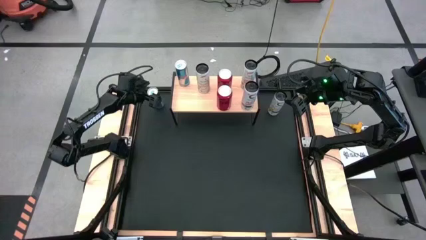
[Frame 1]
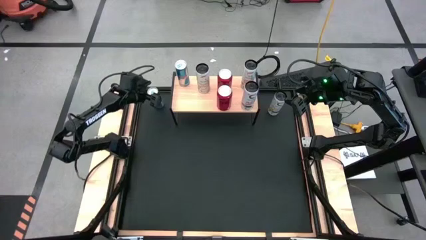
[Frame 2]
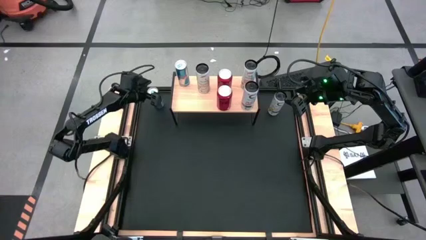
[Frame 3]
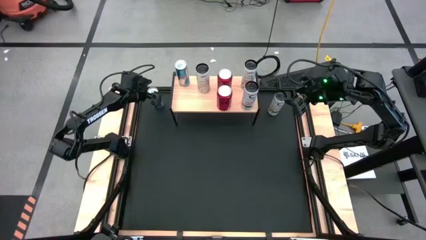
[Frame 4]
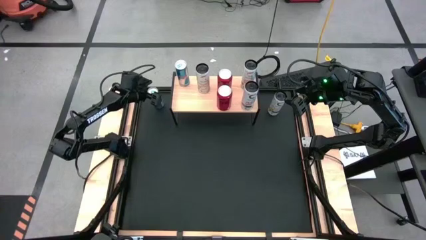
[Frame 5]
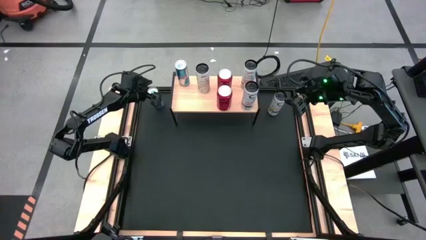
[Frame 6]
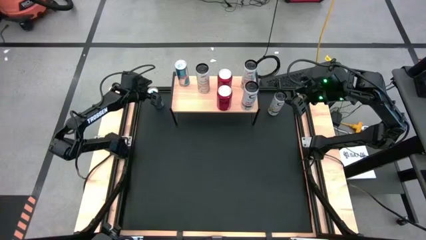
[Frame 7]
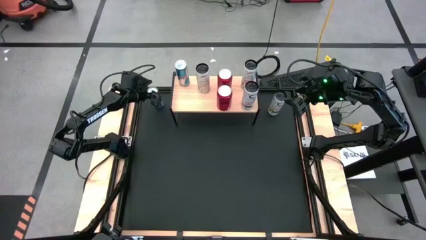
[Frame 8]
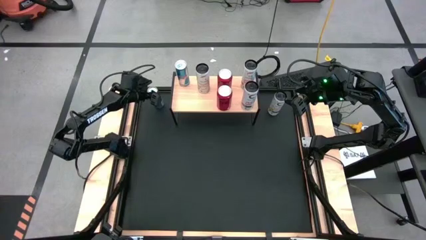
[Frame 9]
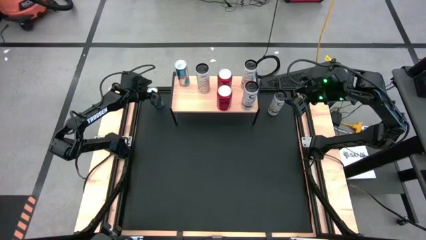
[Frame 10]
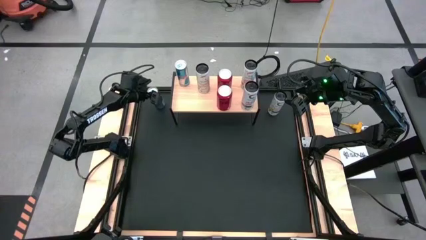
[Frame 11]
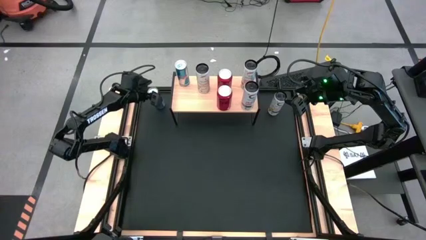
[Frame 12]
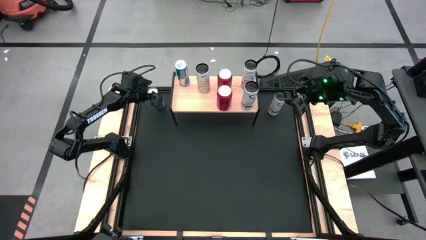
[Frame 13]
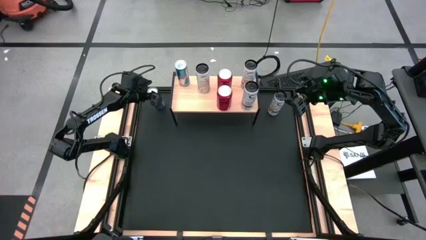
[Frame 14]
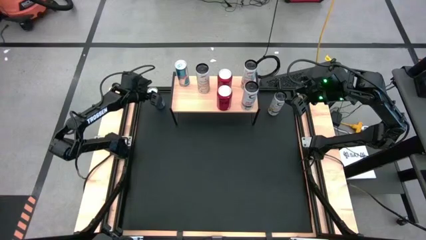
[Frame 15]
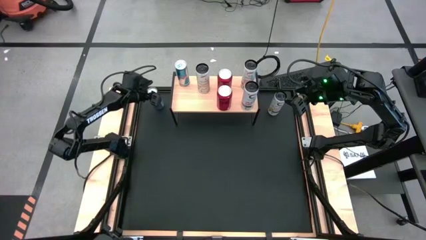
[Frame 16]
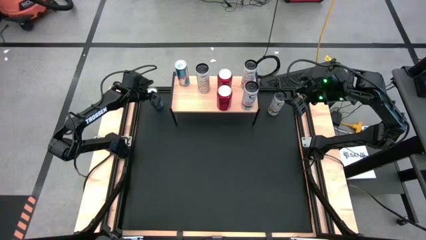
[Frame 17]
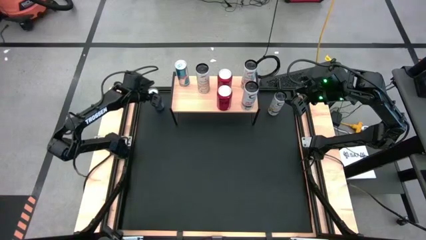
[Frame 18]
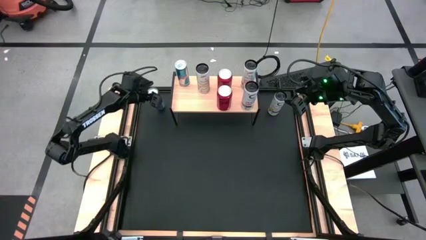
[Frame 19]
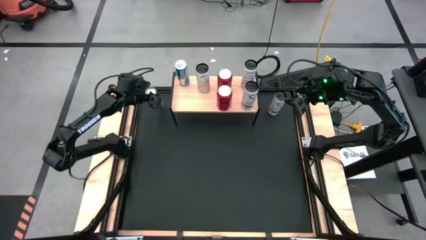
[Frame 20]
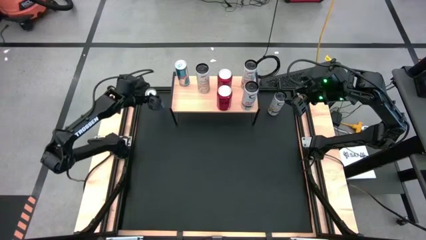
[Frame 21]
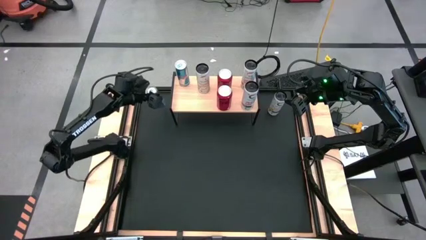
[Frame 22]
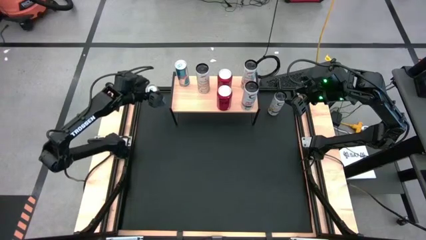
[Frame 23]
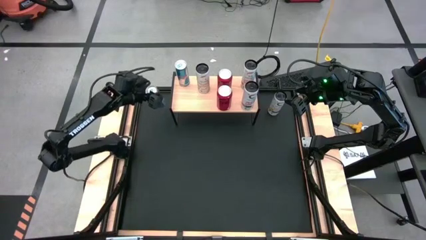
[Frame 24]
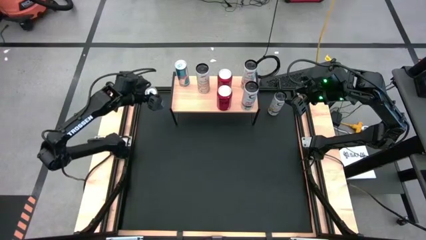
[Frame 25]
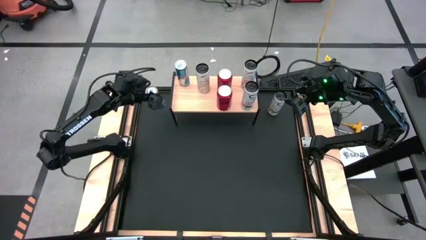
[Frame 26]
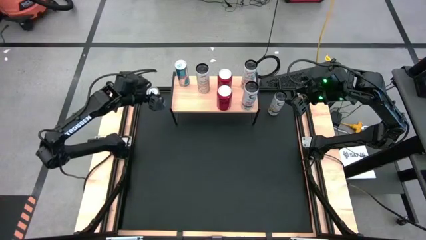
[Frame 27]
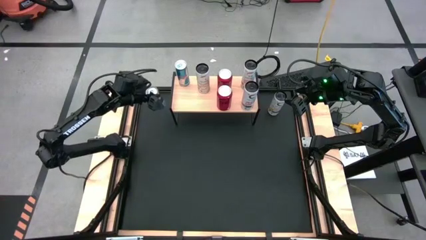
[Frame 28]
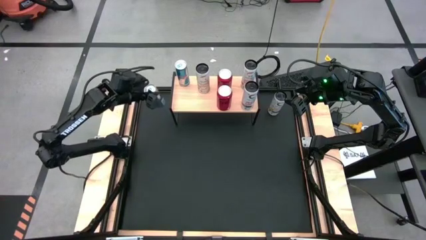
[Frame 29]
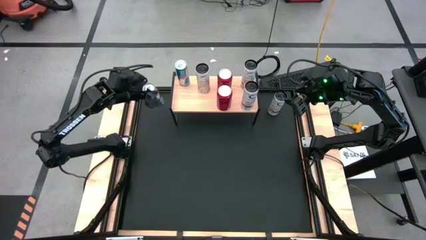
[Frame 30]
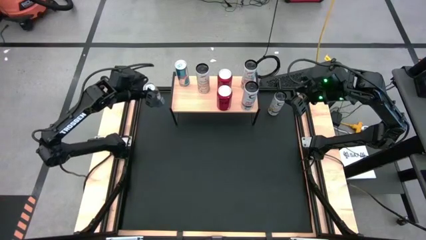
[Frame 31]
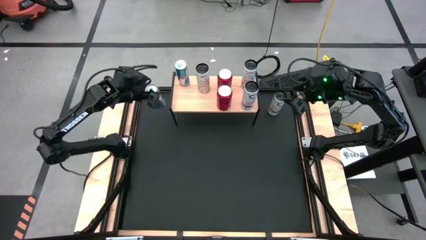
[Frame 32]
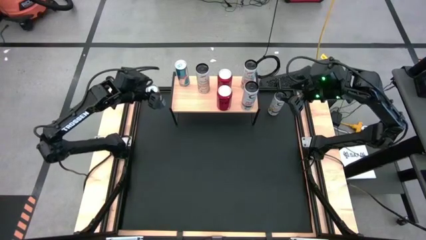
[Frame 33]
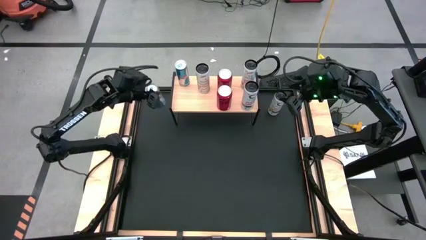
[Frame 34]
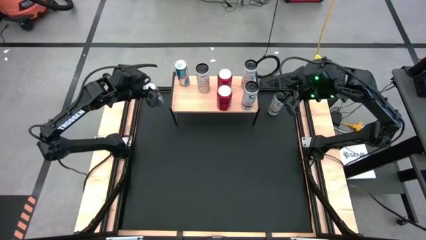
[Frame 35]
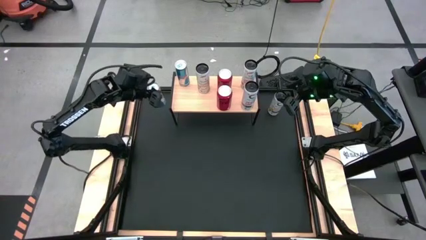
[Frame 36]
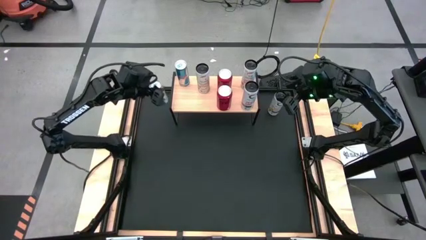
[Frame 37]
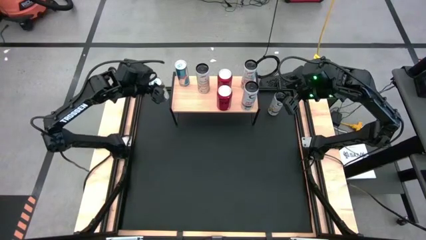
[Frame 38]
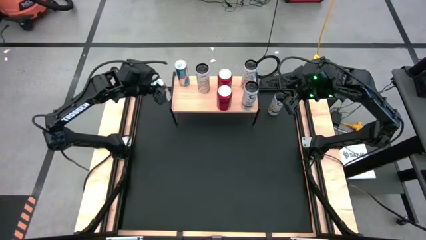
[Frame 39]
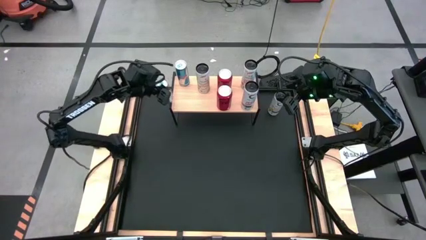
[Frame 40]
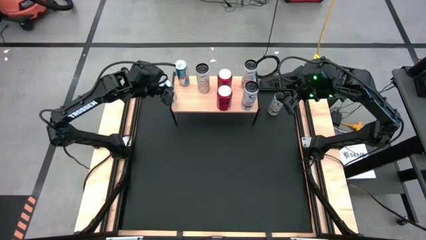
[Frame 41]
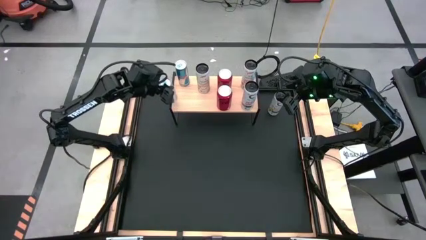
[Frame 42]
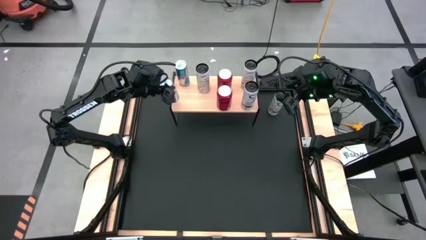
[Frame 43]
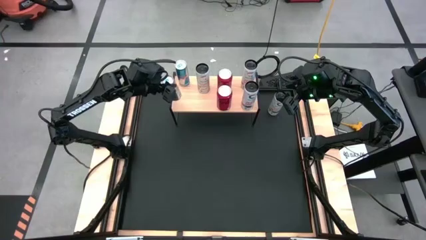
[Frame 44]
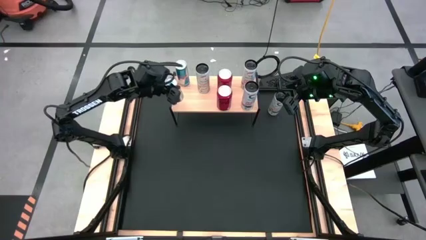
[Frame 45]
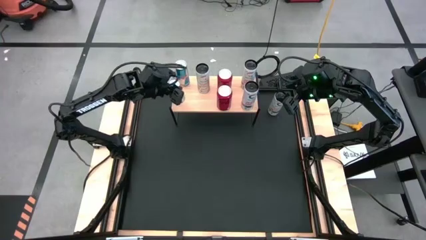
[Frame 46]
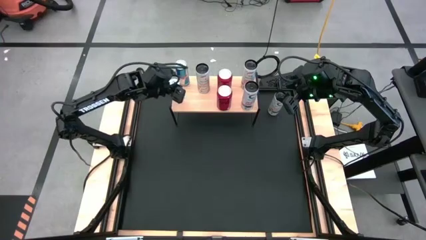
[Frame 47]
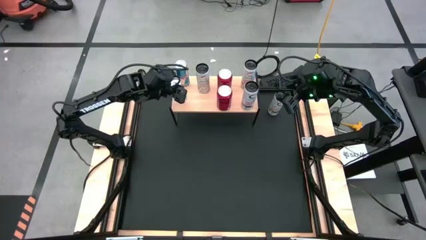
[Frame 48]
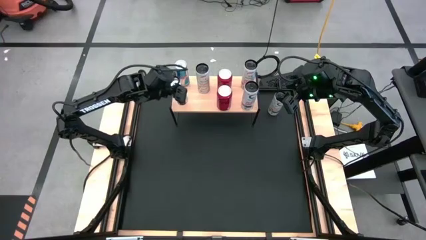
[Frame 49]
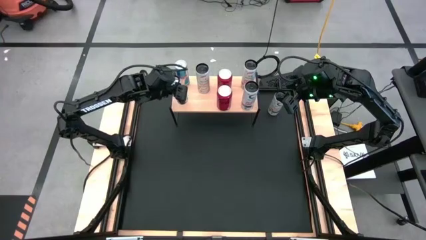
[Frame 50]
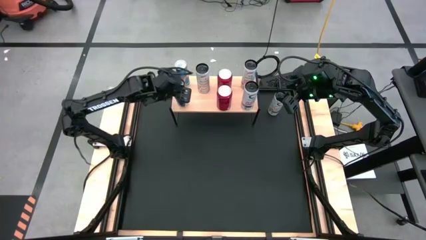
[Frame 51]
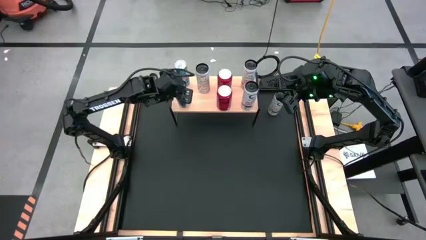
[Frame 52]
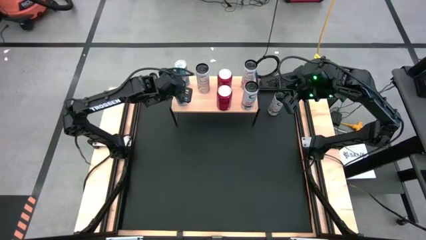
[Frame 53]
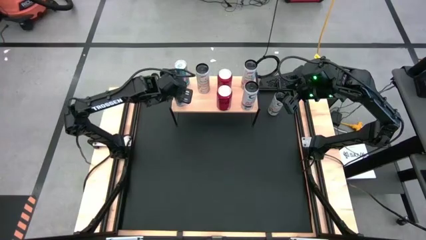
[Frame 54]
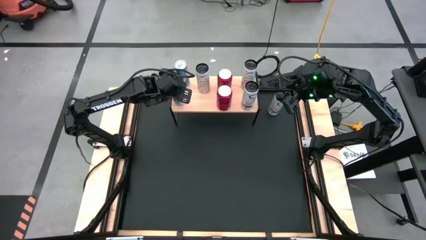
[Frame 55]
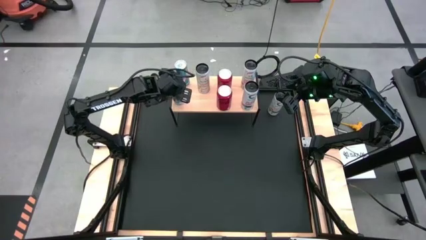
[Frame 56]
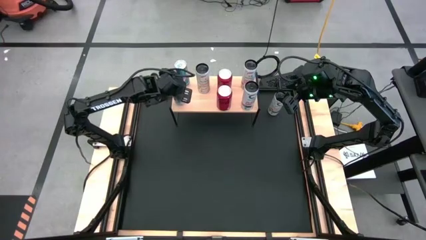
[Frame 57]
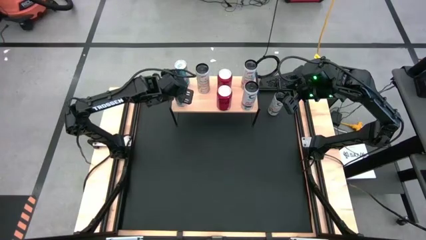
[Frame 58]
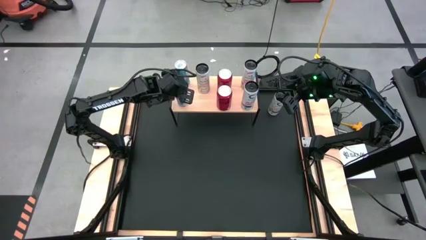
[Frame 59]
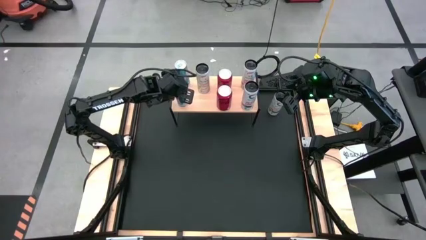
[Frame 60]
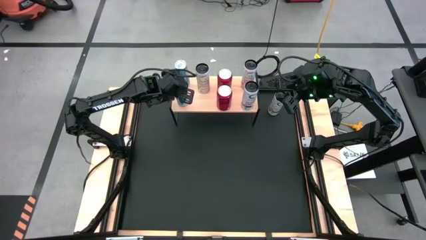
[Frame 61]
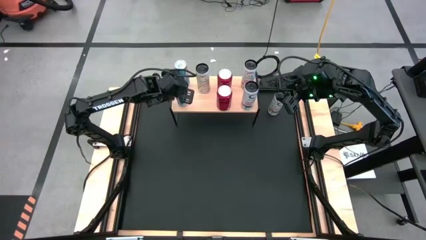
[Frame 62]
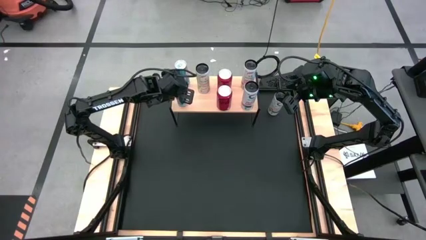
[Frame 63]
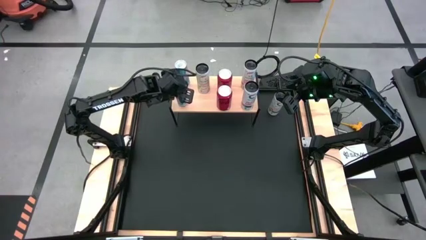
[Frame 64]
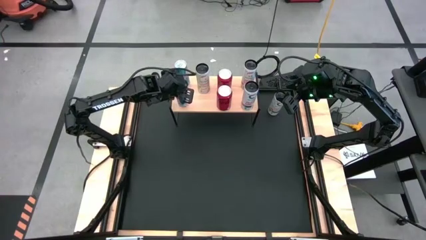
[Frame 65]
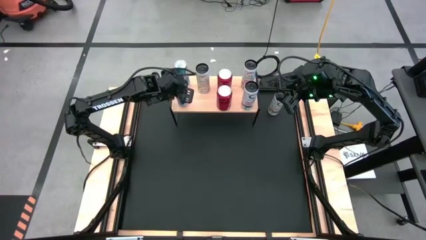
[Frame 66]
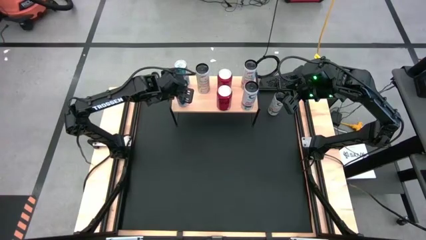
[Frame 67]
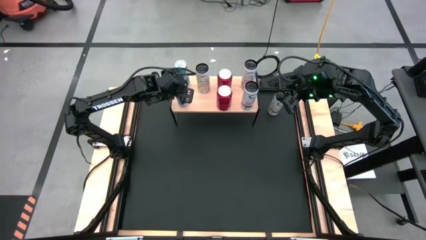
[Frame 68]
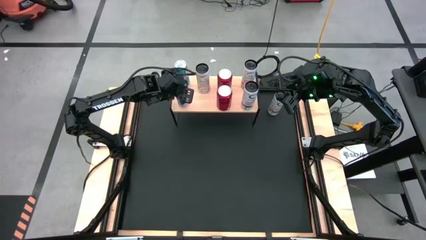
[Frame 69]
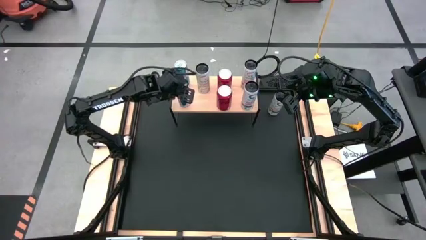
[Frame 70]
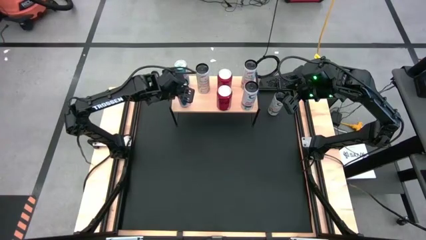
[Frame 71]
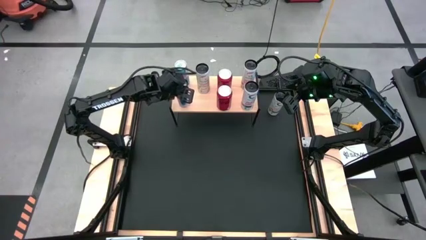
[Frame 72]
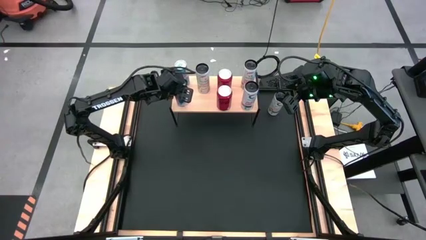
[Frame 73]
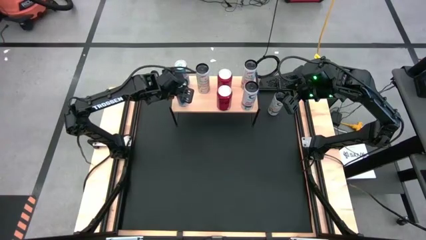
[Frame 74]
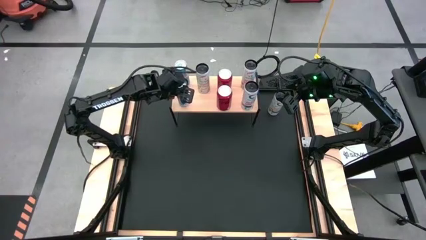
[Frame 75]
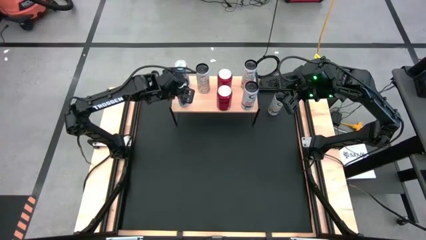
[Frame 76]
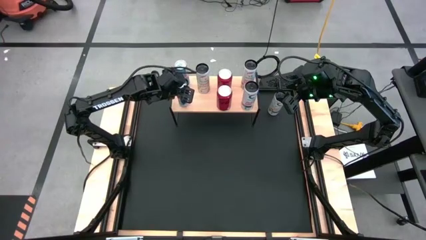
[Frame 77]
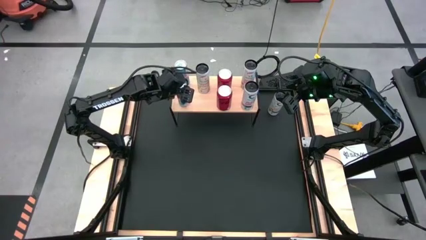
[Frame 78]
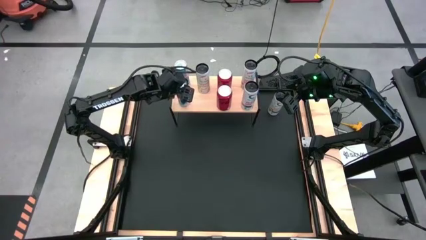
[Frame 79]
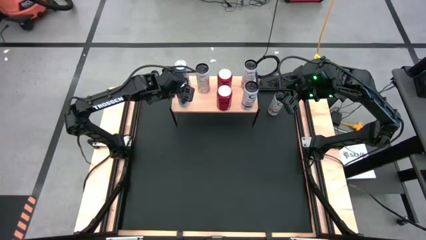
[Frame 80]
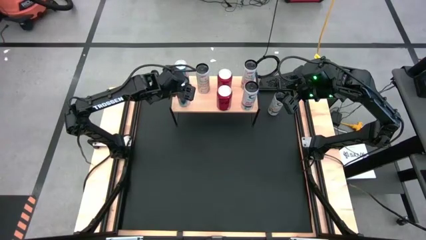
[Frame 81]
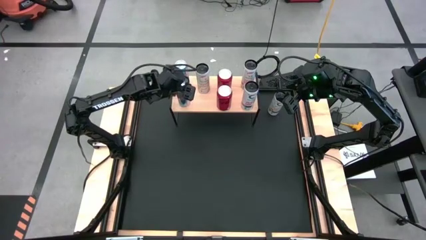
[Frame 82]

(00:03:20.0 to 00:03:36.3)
Task: Place canned beverage on shelf
Put the blue soda can on the shelf aligned with the other blue soda can
